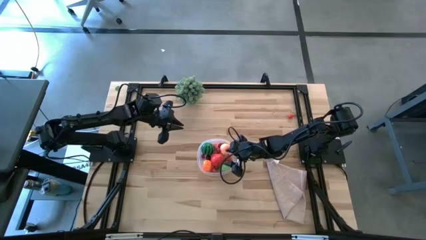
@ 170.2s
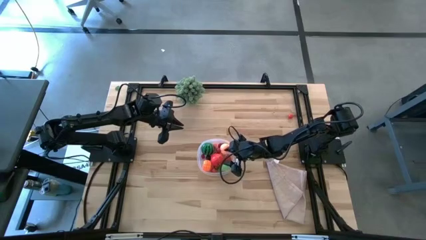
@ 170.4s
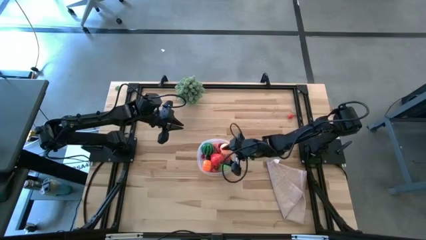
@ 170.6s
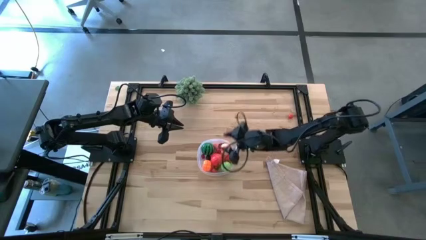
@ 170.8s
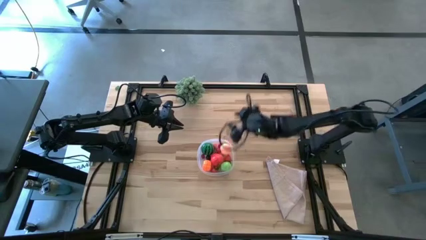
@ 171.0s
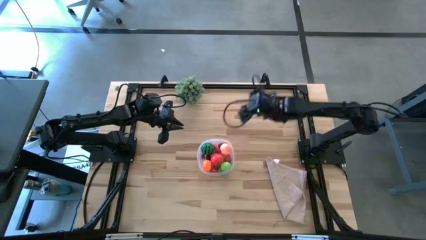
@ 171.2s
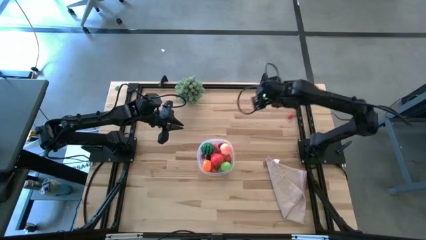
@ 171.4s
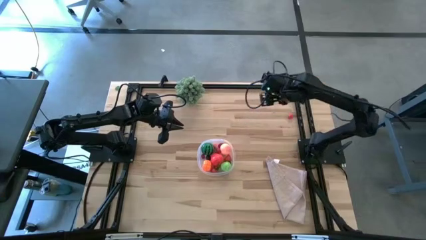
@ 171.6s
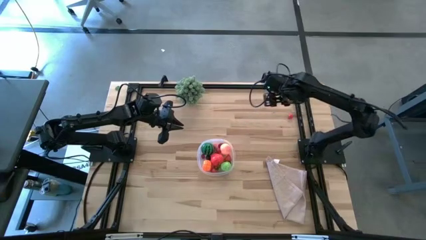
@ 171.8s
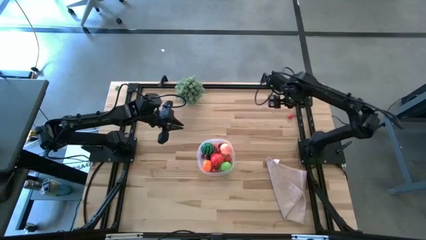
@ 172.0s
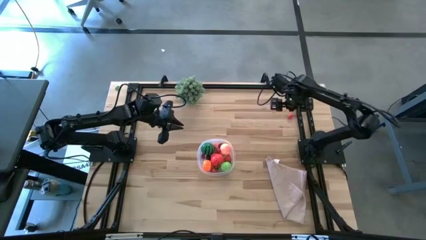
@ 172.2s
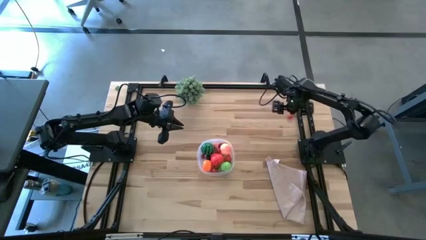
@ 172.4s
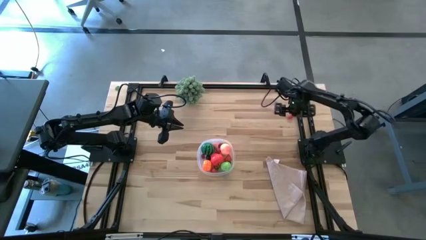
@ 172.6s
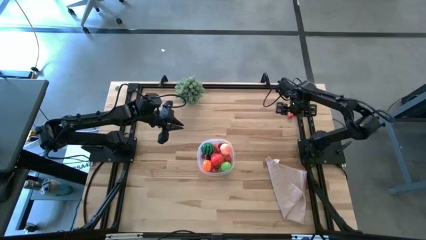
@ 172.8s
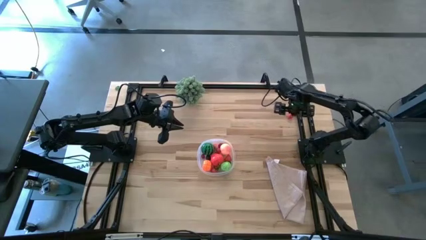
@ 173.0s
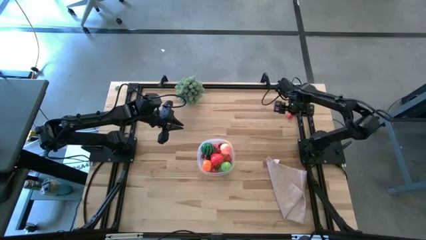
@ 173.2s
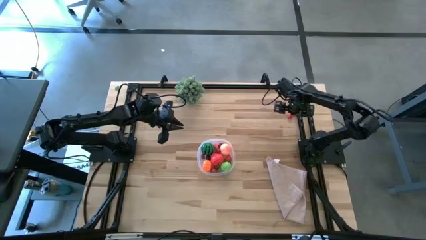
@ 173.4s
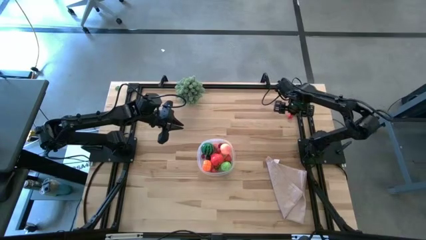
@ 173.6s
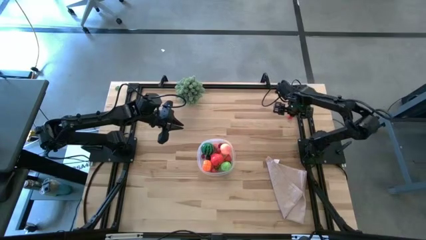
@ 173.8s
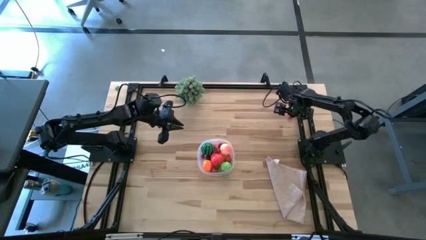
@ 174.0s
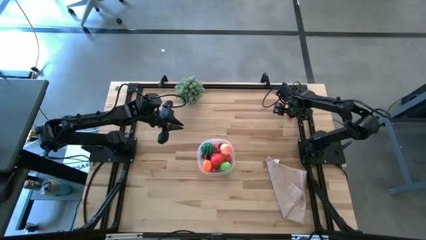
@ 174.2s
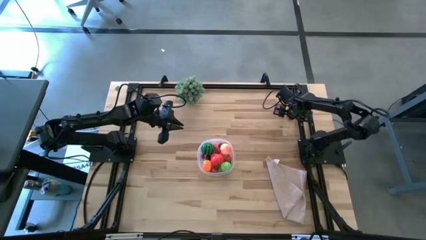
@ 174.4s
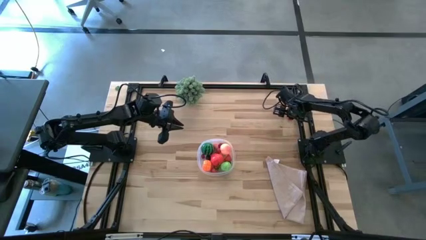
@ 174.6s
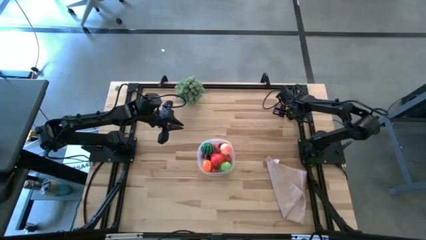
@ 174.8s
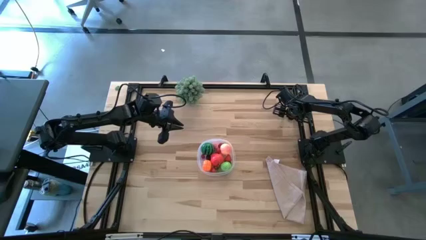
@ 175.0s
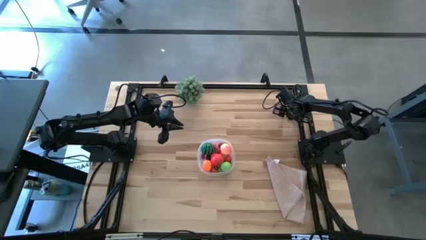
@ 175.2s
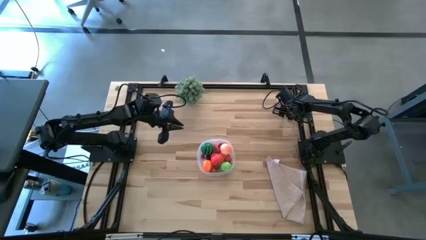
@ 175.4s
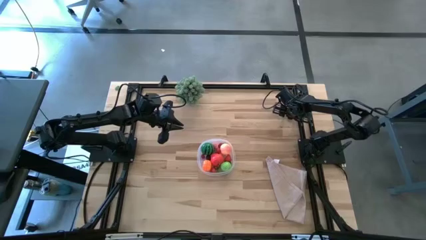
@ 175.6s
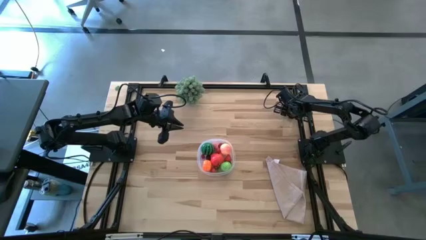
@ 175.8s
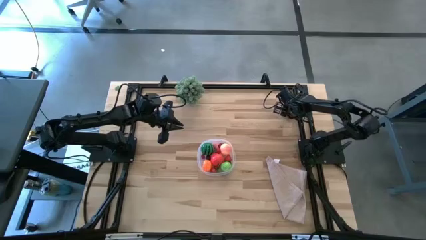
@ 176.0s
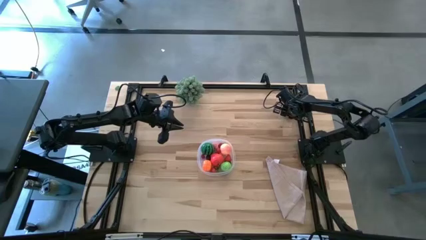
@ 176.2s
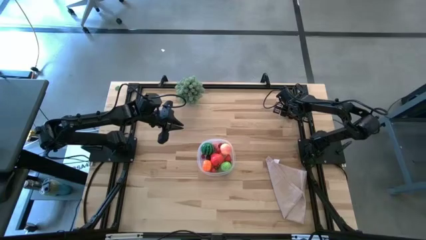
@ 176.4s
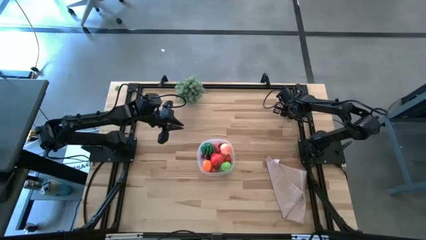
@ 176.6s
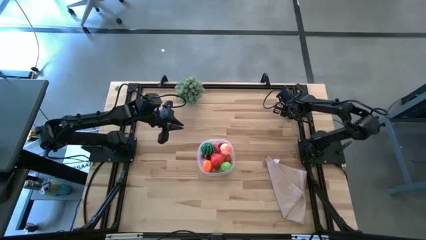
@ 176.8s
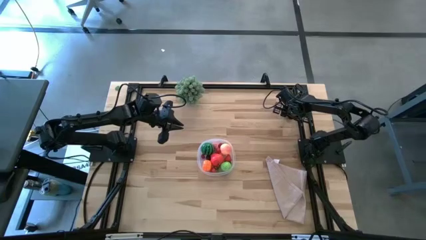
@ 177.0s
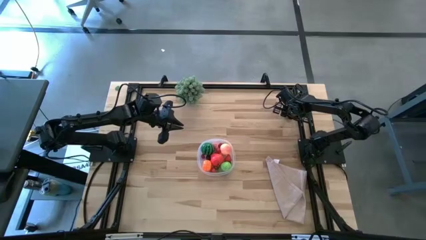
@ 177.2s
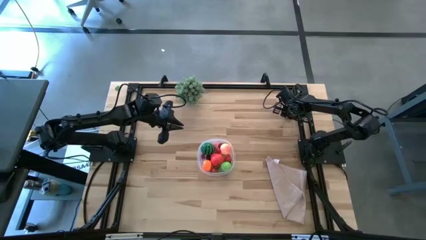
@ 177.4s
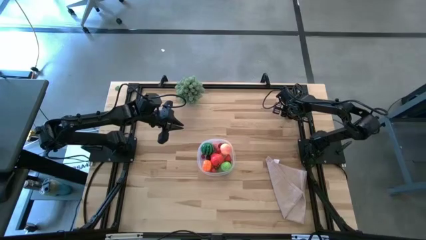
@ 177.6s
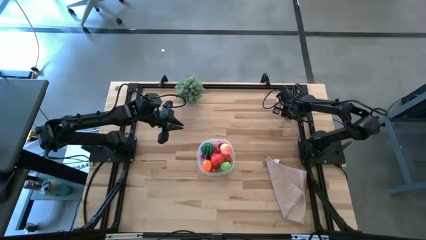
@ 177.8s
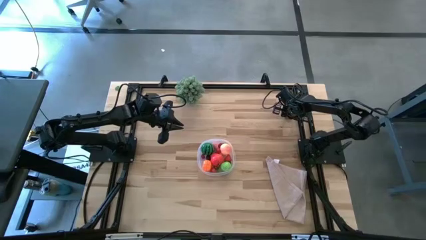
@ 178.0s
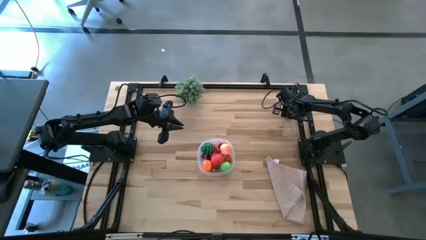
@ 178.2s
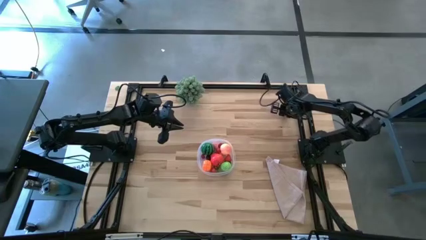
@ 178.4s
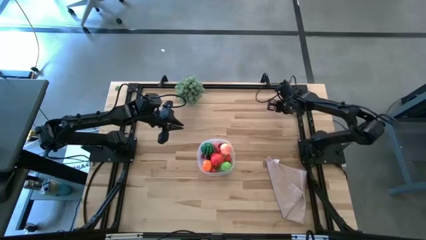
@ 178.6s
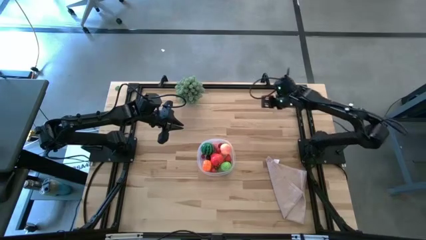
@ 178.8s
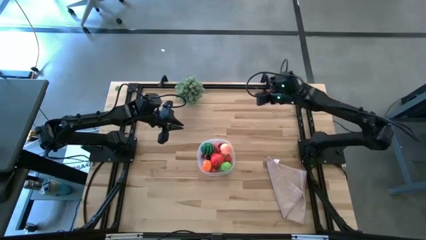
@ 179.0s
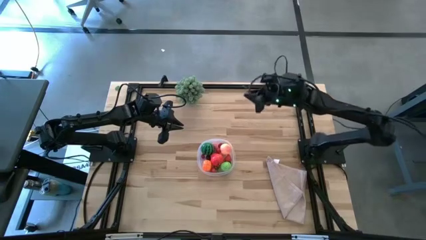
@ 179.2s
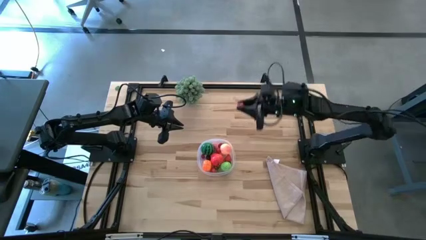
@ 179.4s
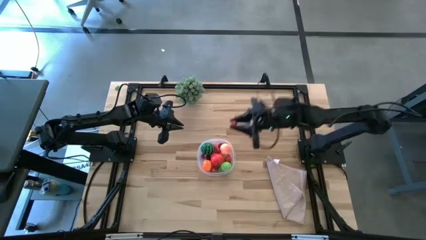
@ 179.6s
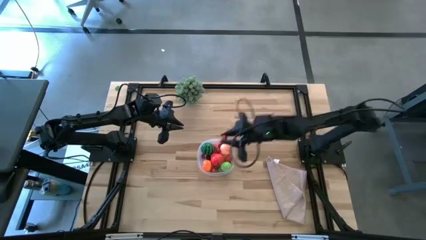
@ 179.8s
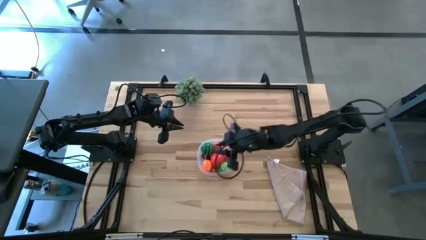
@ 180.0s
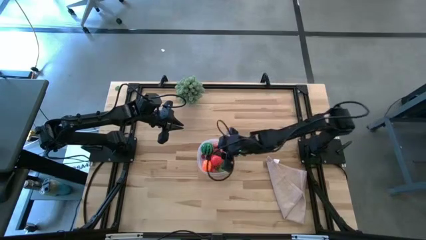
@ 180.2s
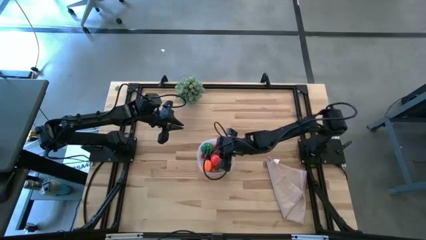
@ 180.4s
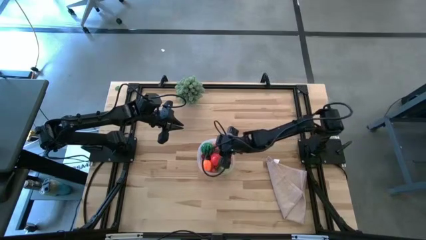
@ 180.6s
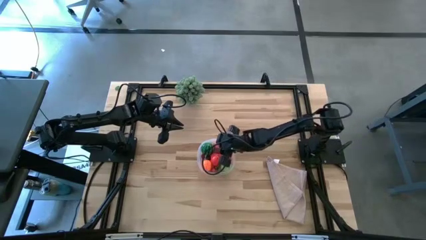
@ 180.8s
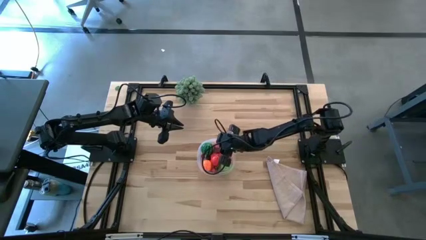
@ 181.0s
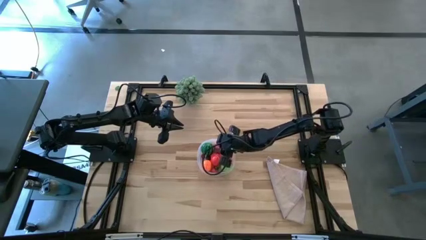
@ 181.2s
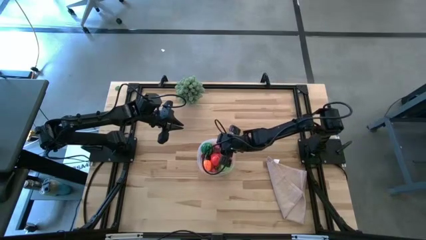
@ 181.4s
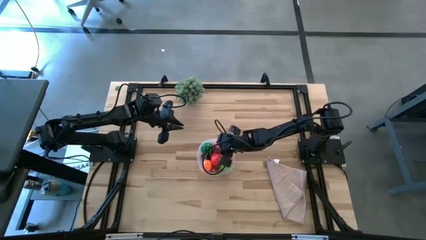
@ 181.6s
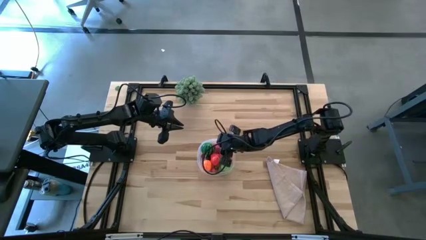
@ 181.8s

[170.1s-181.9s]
Task: Pick and placing Produce into tupperware
Put the cherry into the transparent container

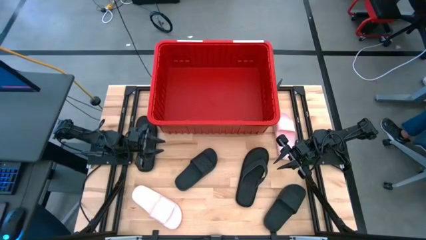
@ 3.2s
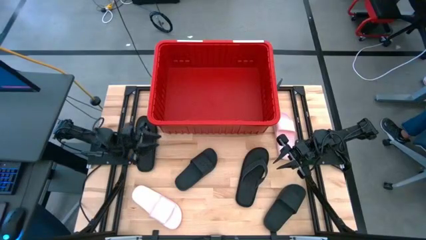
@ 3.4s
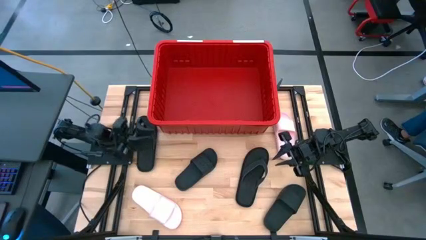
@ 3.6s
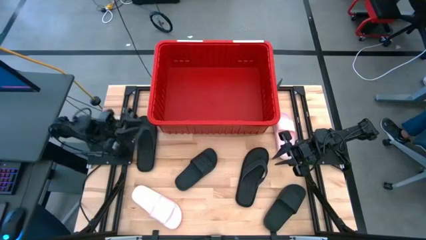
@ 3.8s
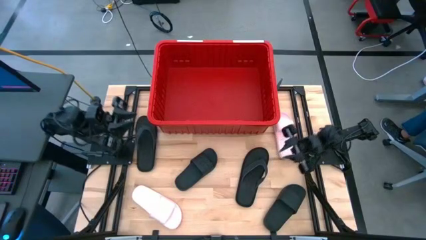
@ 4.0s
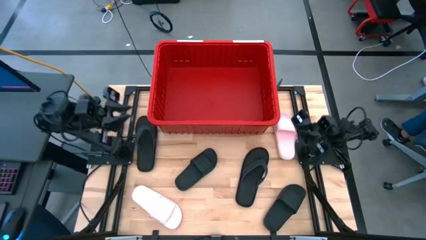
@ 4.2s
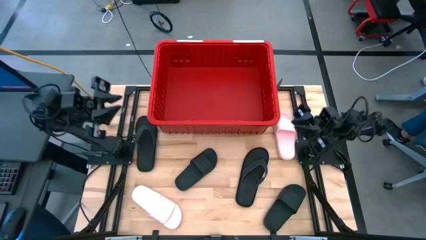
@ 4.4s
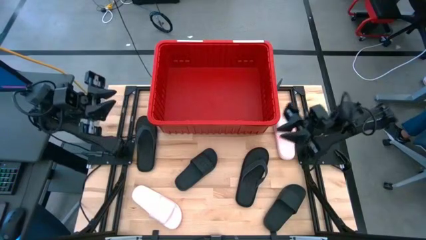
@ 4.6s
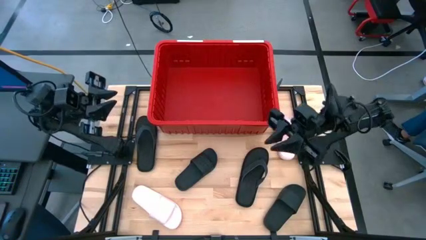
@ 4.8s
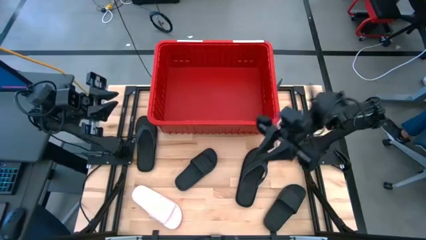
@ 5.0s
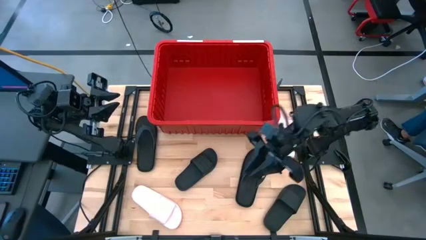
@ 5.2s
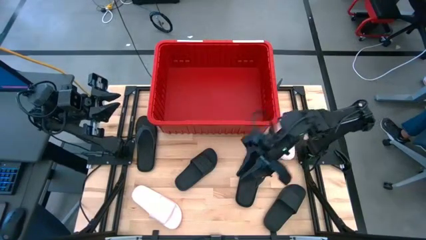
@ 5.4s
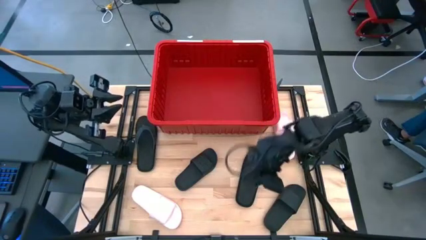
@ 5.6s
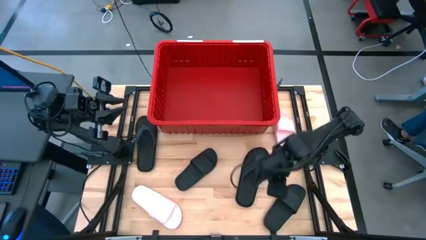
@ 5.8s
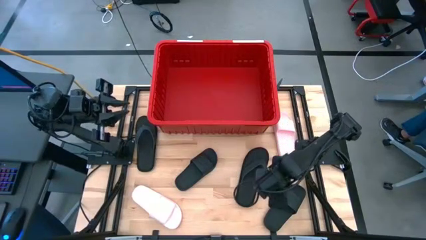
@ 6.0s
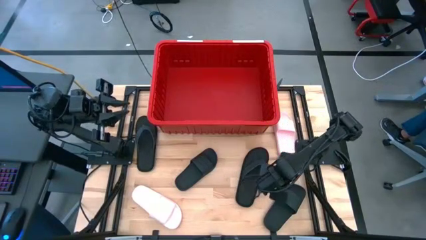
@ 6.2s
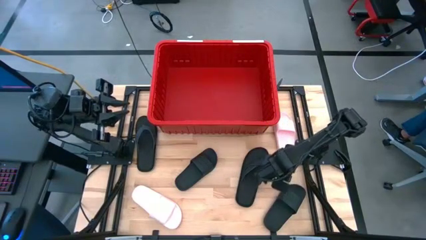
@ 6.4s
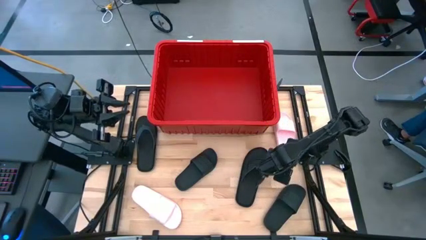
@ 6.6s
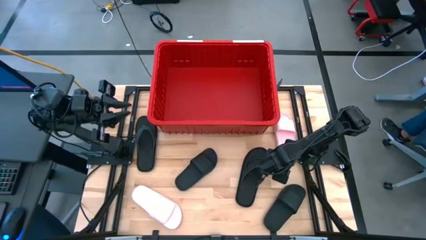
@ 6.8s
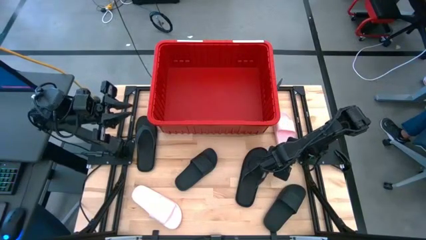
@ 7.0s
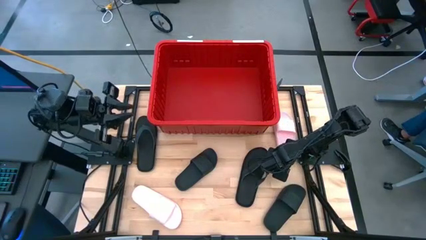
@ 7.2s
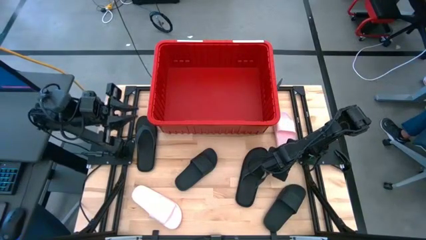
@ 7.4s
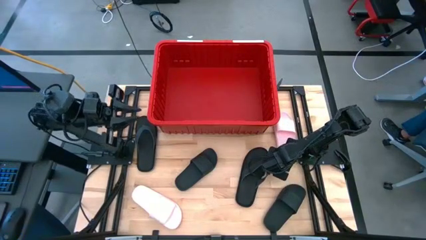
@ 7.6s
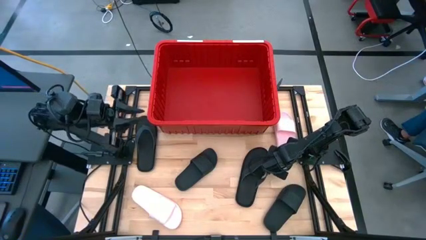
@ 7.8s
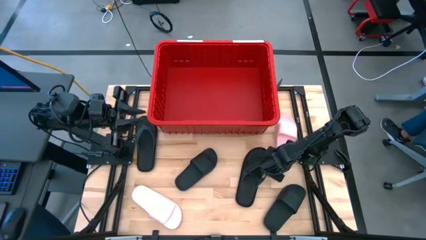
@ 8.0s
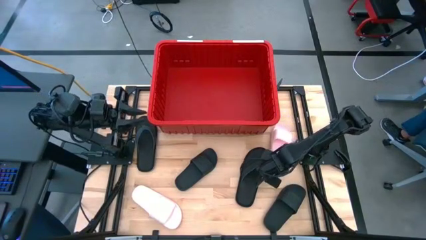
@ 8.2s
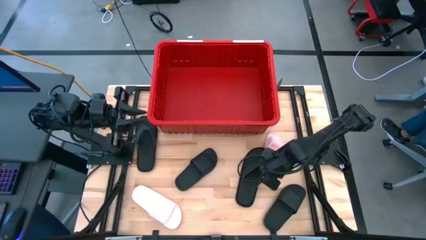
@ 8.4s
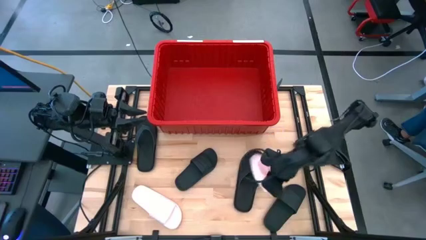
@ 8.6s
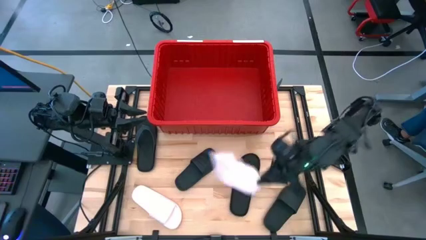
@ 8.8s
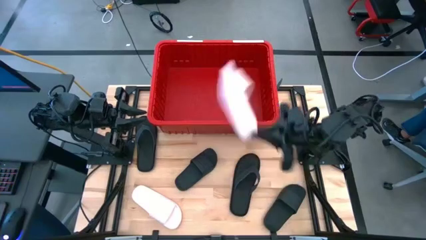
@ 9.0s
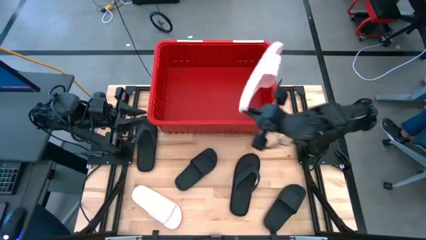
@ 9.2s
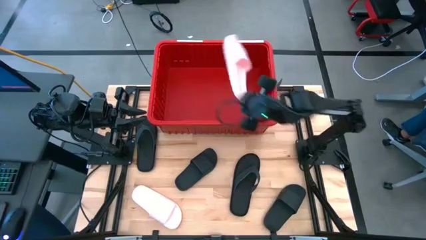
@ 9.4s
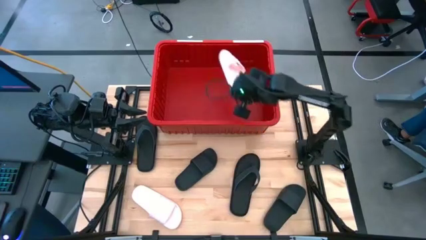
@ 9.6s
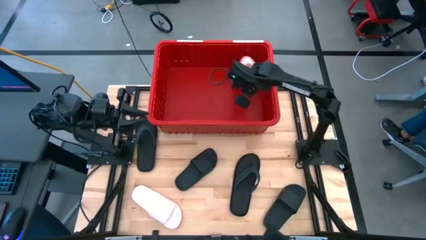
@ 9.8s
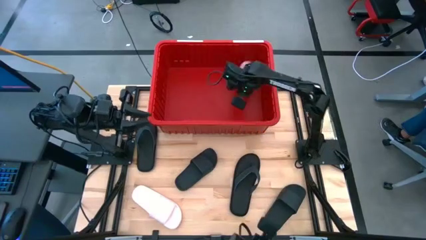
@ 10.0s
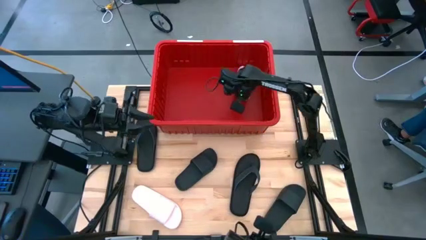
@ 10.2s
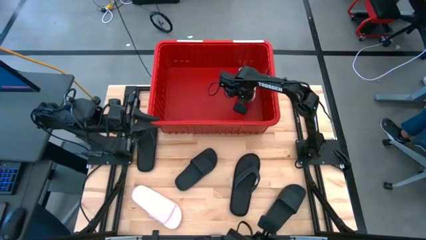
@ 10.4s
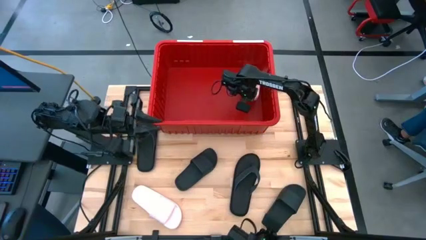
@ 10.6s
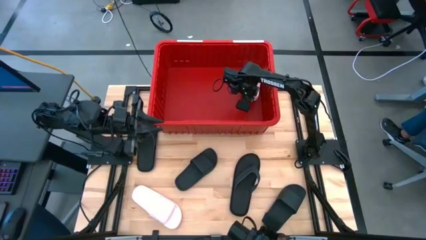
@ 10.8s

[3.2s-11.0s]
Task: Pick and place slides into bin
Put the top pink slide into the red bin
